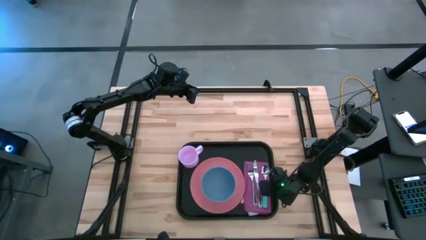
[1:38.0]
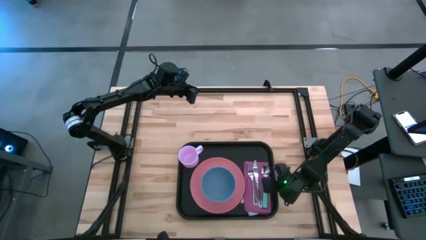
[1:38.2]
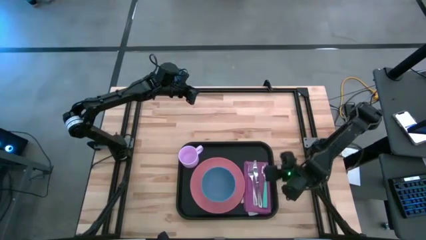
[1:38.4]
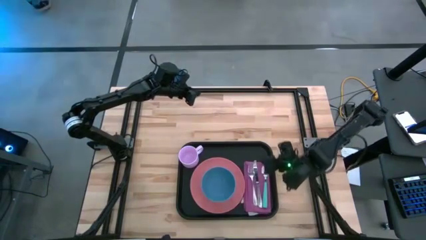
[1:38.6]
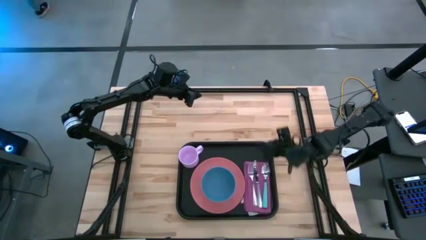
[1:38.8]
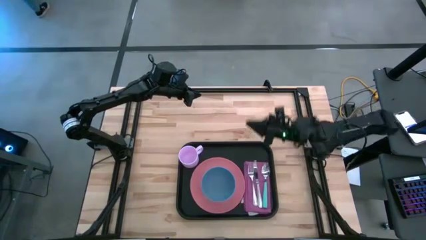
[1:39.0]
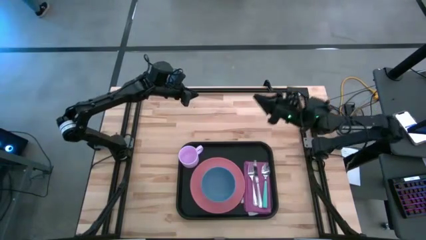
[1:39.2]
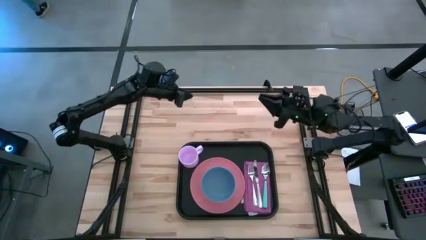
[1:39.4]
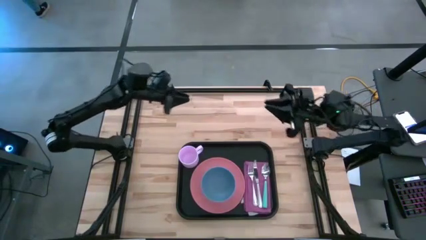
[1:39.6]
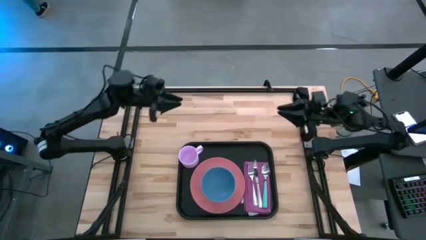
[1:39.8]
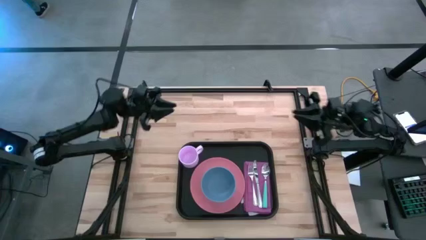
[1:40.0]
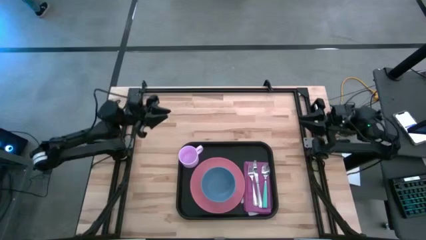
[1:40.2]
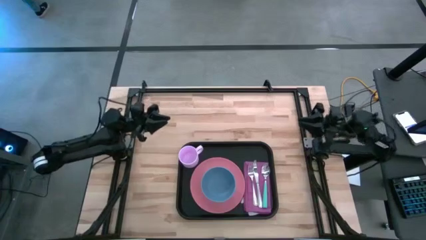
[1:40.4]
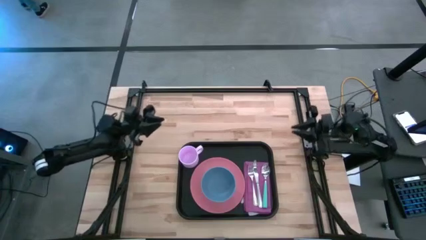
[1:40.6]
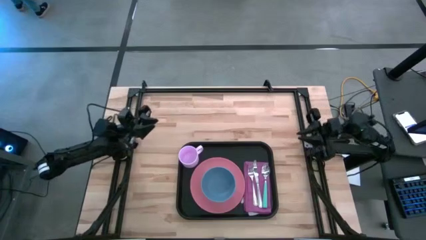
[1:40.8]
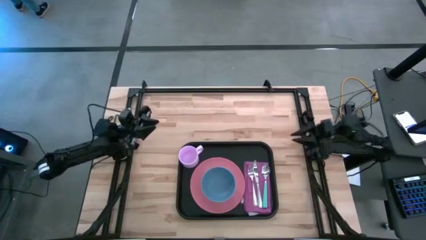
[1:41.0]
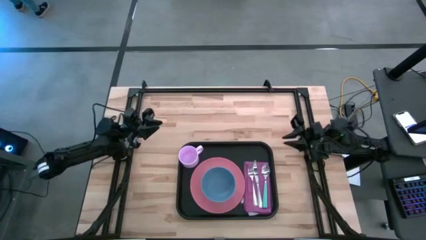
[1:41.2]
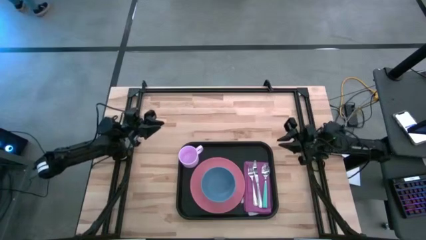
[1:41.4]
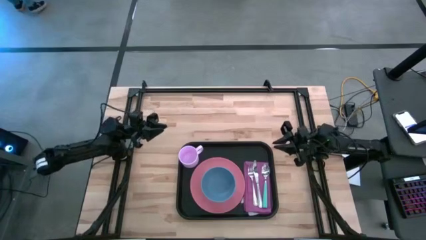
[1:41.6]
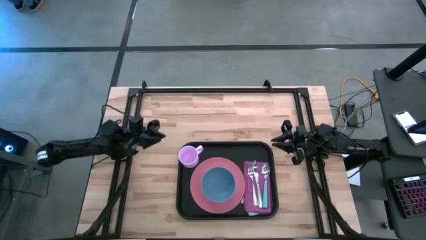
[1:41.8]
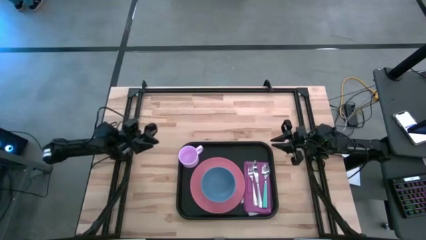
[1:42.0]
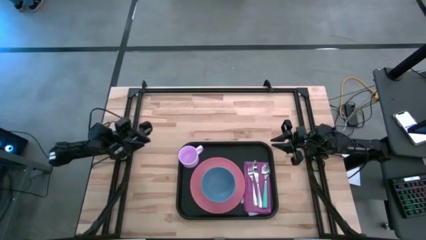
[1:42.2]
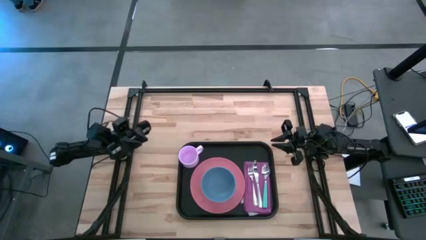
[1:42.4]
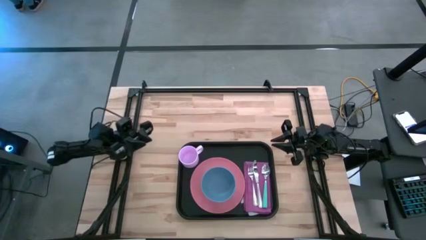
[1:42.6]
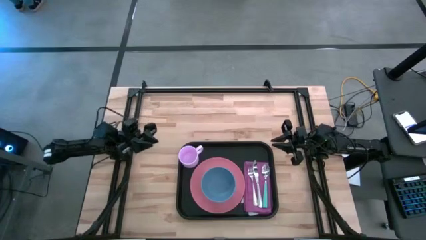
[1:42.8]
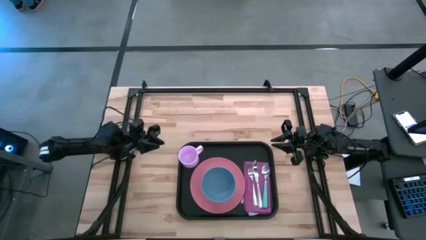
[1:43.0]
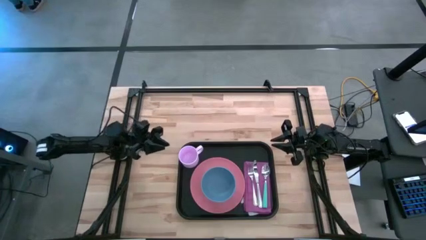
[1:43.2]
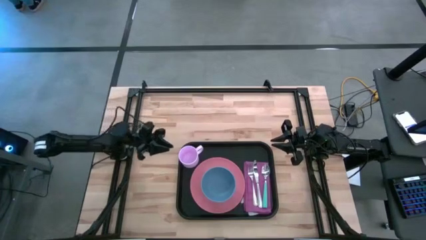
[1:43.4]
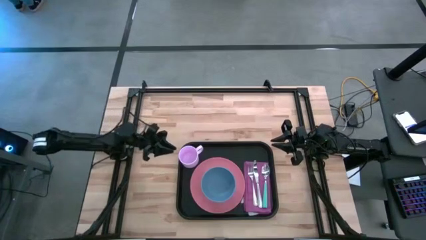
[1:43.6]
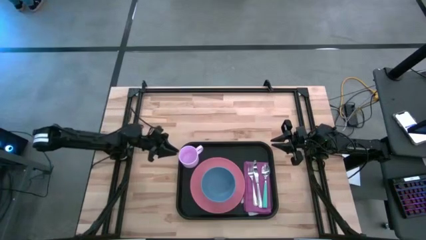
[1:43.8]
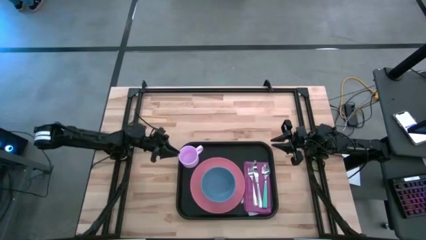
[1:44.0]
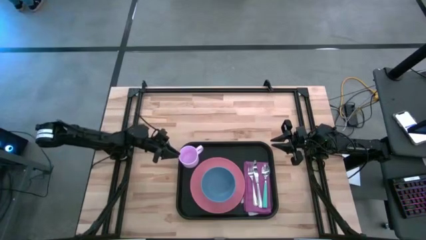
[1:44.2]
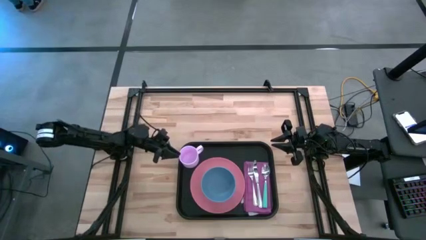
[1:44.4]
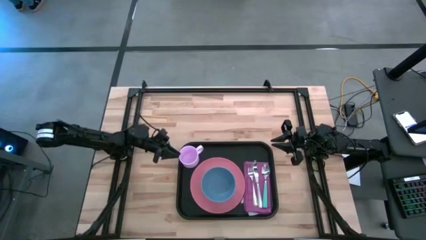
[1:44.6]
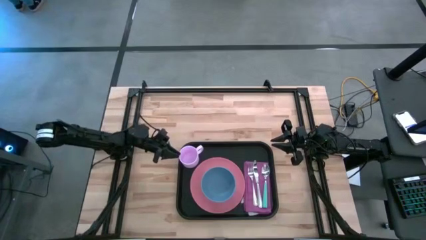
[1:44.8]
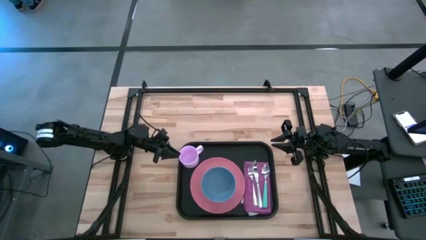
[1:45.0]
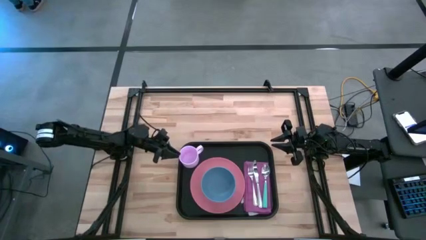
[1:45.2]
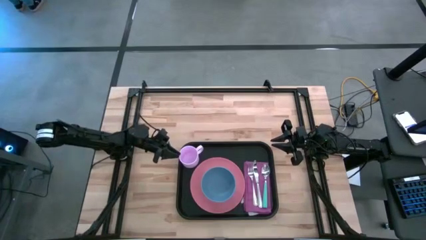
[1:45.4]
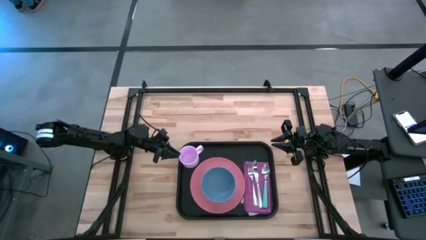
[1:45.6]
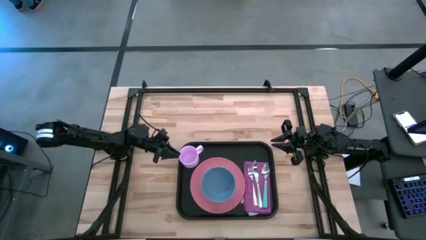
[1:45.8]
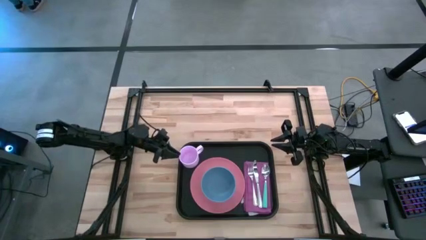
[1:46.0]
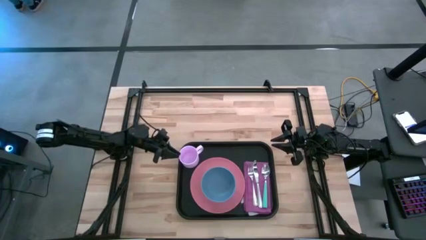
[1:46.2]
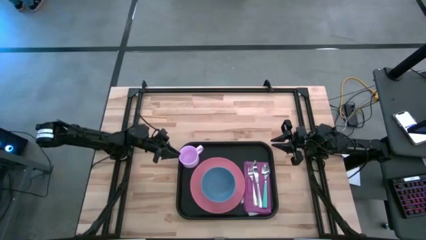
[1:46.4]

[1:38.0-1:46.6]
Task: Set up tray
Return to Home Position

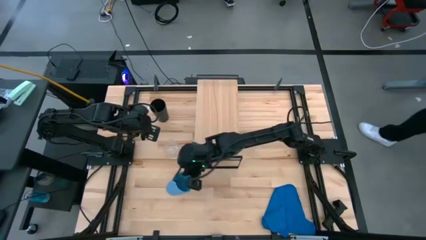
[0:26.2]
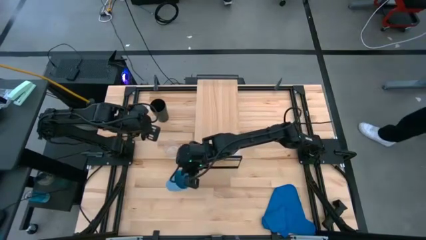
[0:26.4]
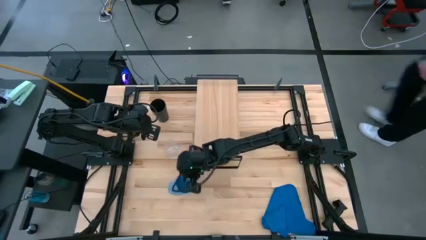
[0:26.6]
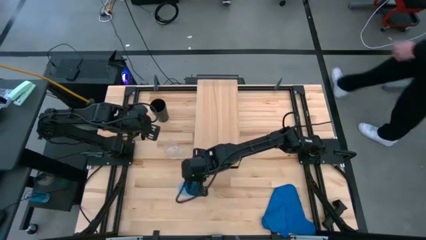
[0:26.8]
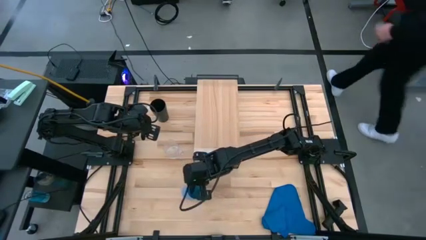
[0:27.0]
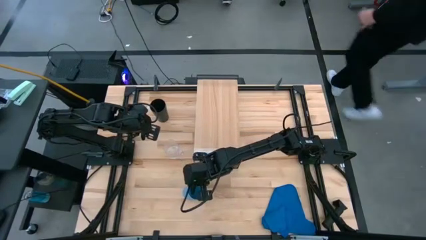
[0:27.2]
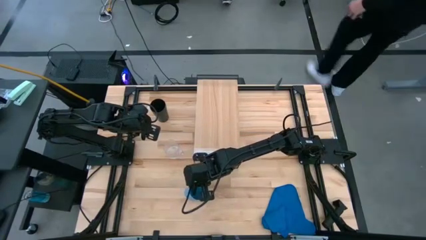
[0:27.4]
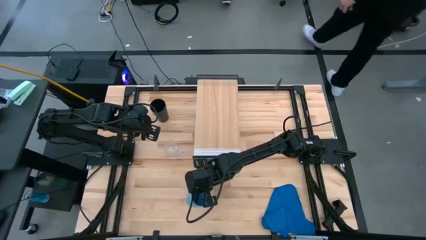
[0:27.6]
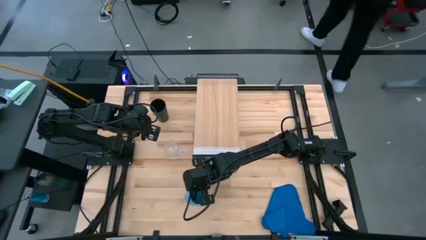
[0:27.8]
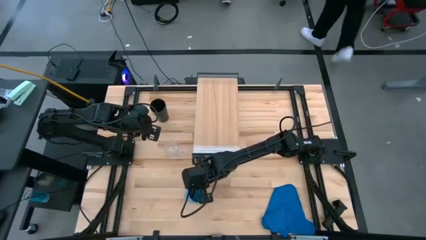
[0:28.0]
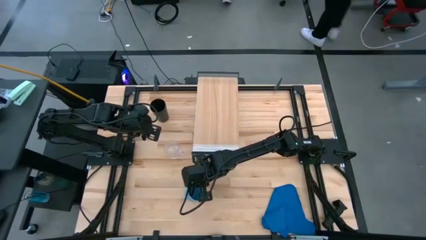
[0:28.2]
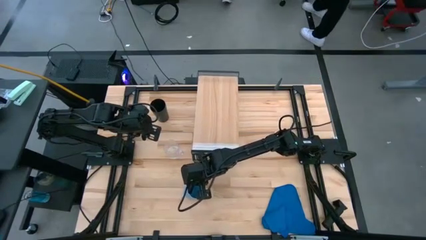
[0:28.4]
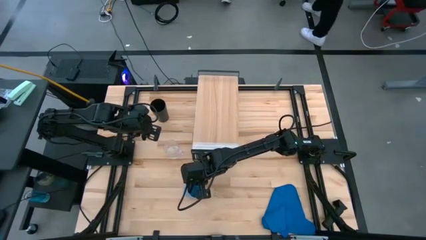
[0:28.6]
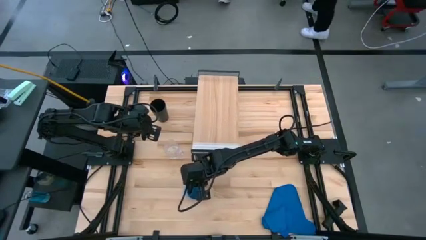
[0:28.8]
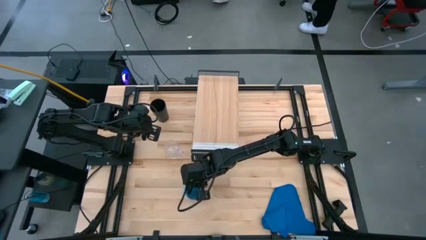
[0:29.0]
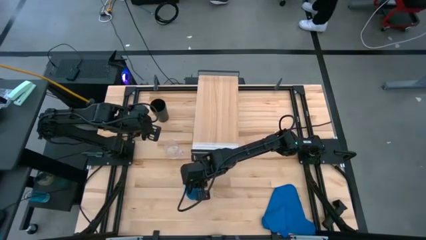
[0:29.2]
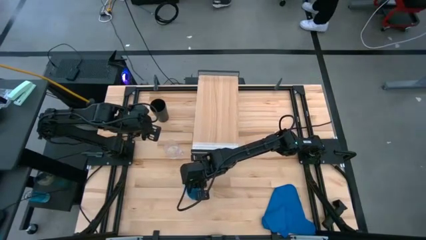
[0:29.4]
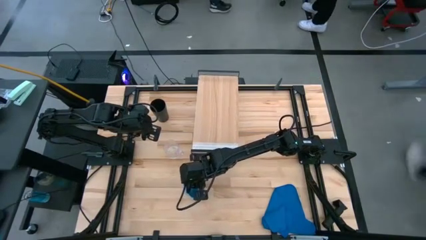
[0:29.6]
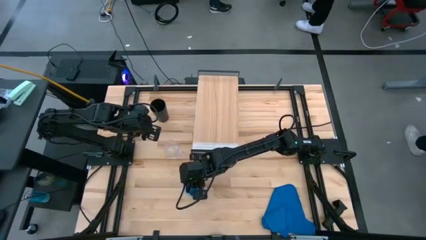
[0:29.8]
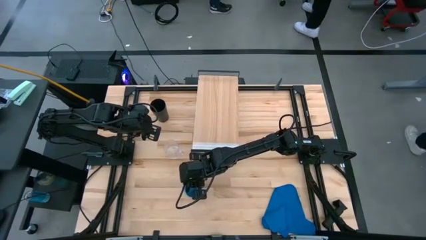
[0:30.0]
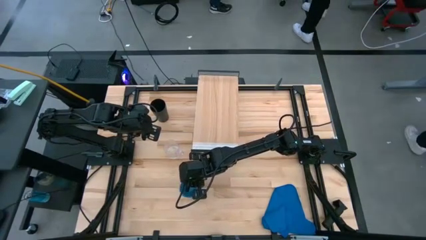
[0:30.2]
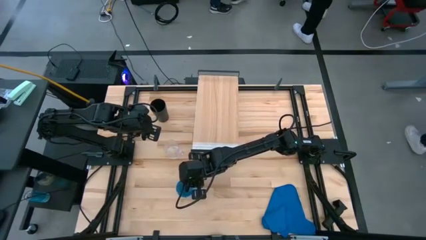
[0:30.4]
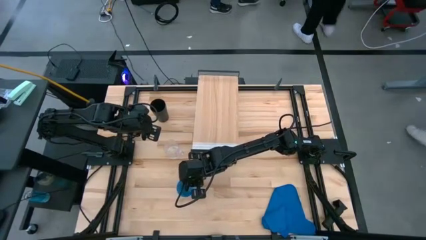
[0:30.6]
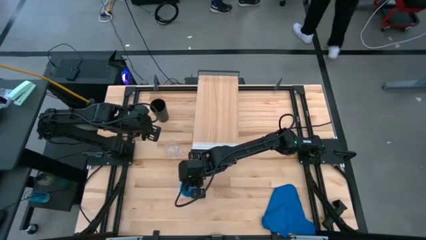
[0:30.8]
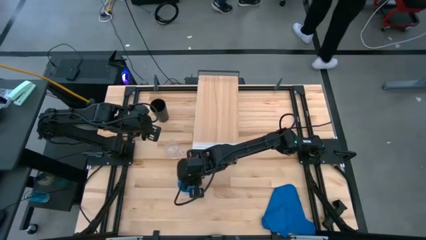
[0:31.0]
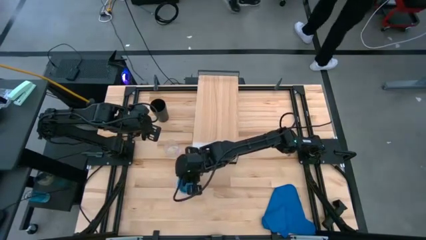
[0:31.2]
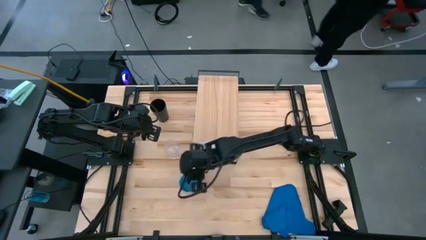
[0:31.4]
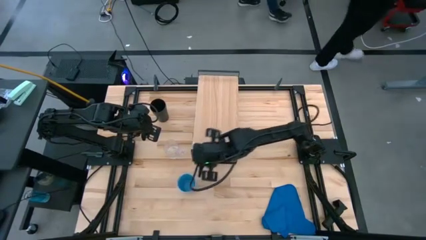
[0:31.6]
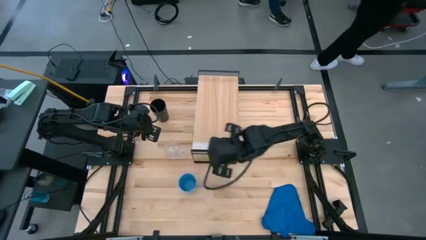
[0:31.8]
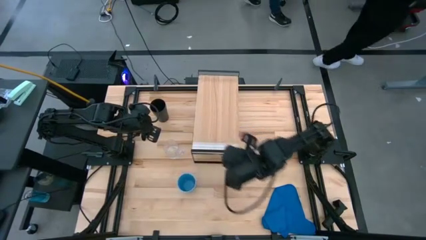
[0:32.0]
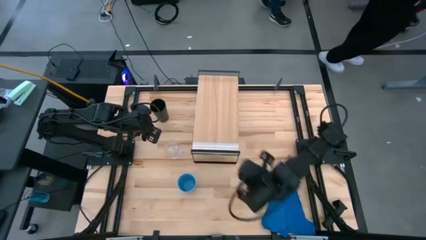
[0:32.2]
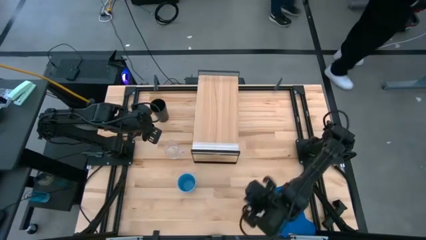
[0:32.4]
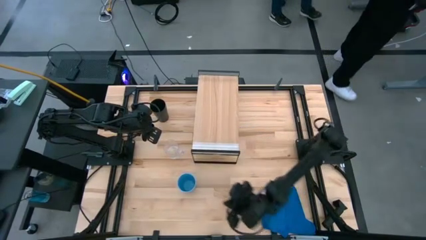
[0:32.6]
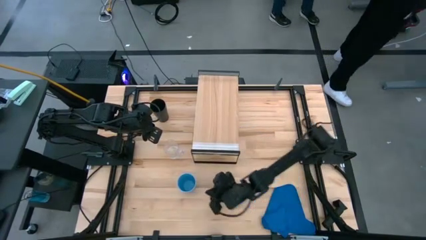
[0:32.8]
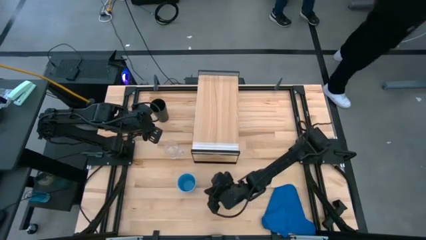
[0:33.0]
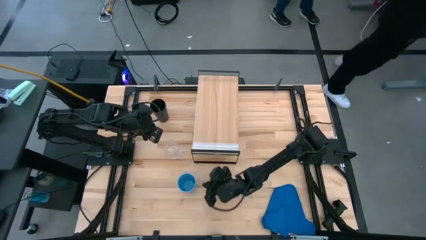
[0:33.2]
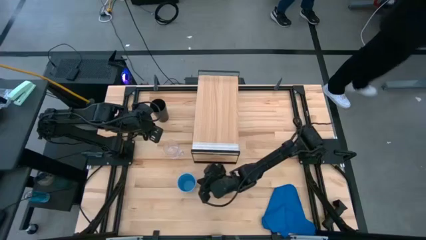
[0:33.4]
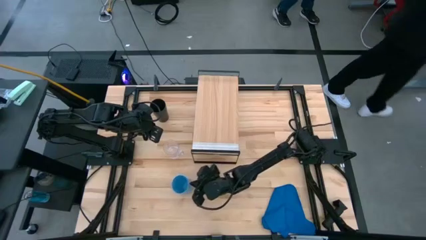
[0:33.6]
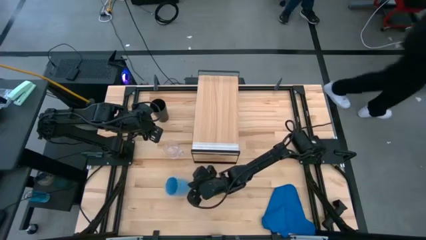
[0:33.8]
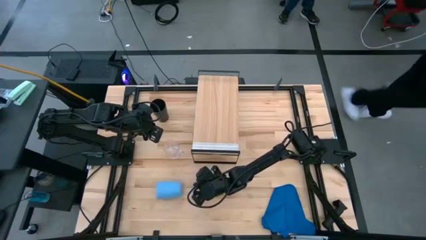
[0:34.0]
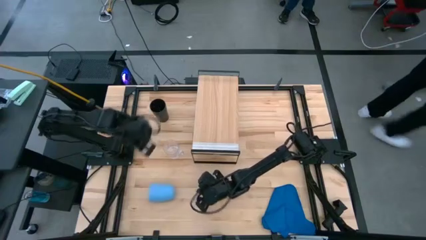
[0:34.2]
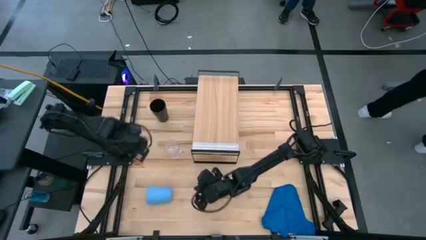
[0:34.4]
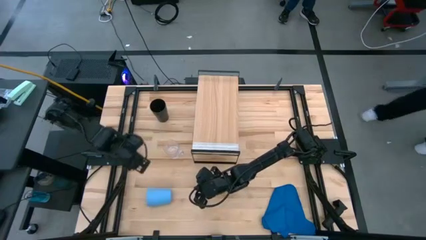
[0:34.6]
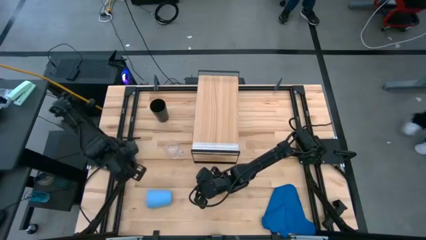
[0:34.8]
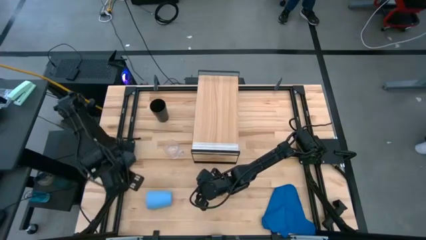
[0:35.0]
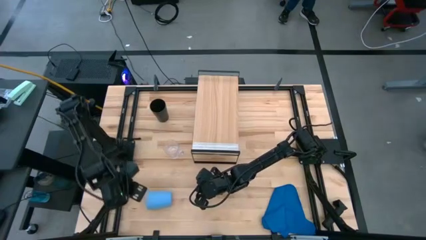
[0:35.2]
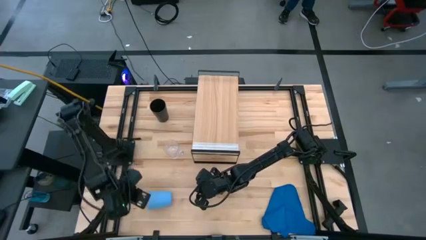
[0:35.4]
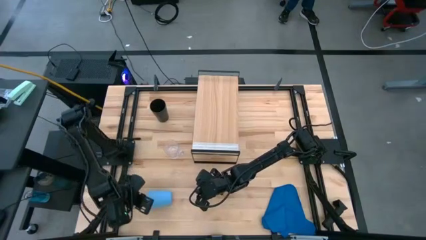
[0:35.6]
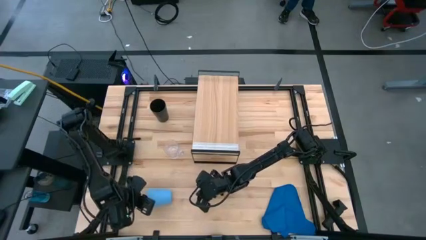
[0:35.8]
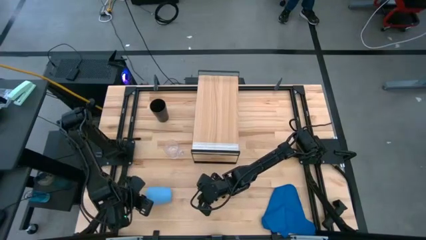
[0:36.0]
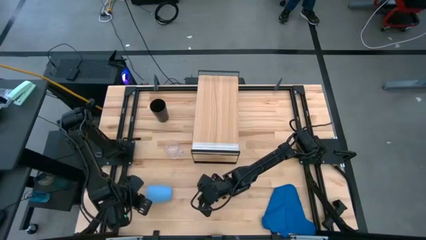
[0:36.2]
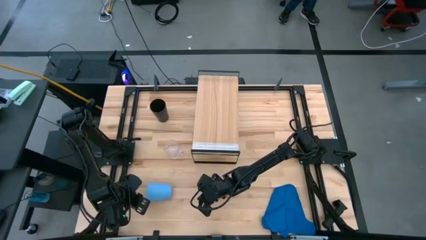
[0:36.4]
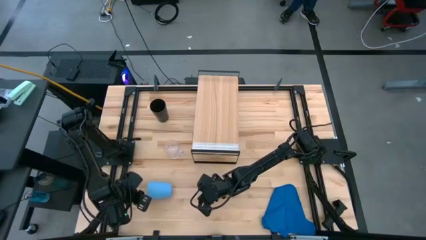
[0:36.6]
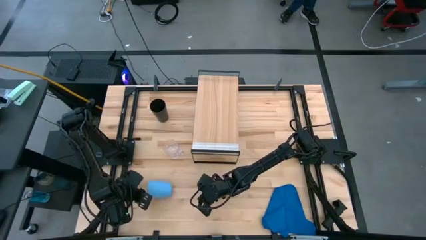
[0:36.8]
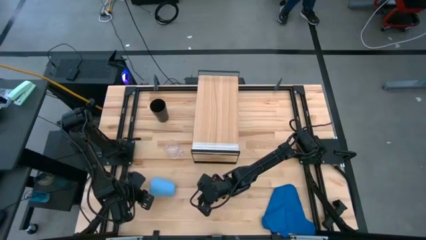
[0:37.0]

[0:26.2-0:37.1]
Task: Stack small to large cups/mugs on shelf
Move the blue cup to the middle left of the table
